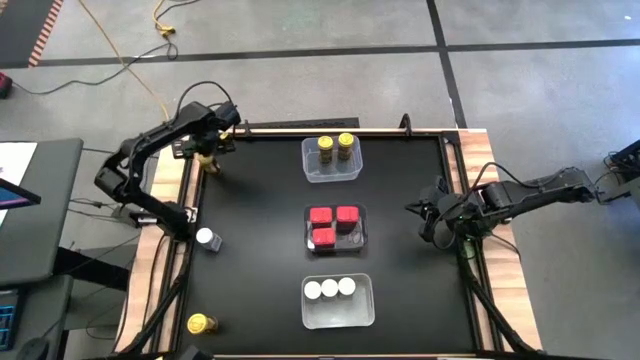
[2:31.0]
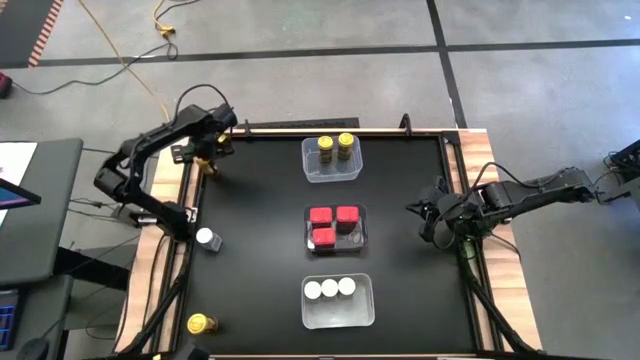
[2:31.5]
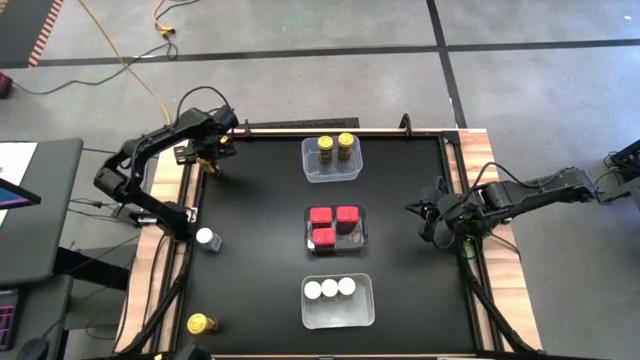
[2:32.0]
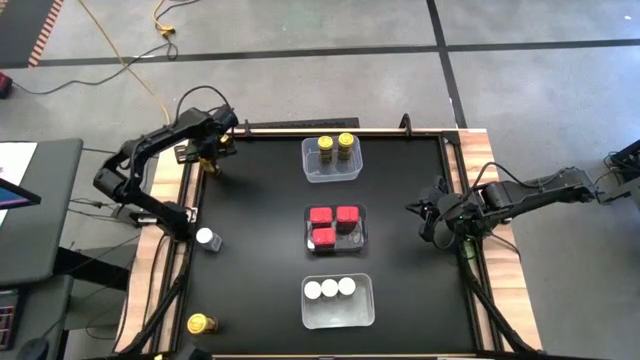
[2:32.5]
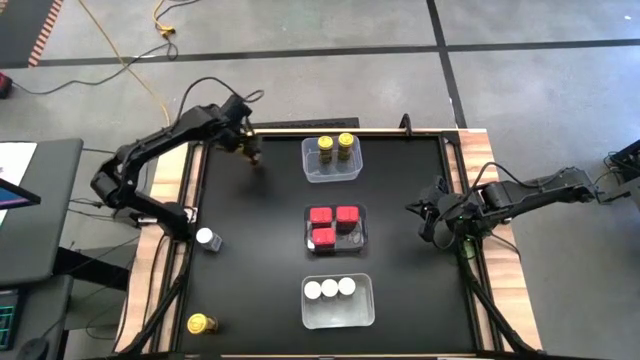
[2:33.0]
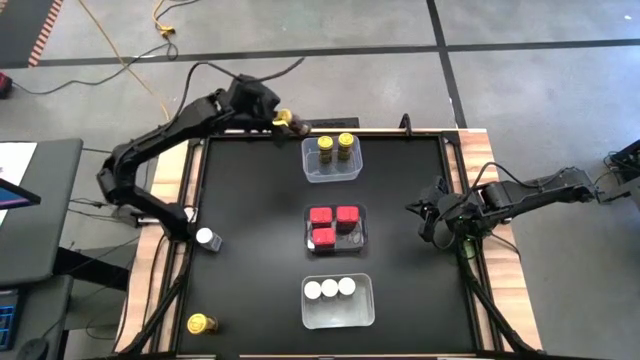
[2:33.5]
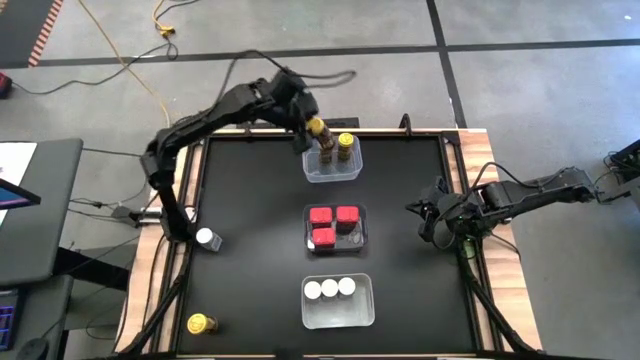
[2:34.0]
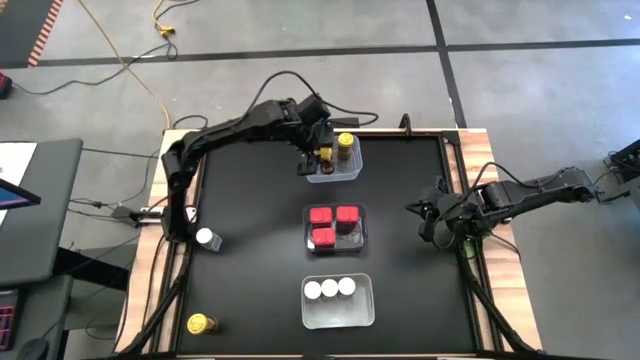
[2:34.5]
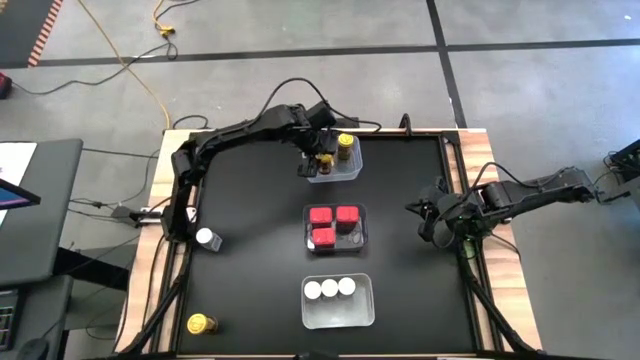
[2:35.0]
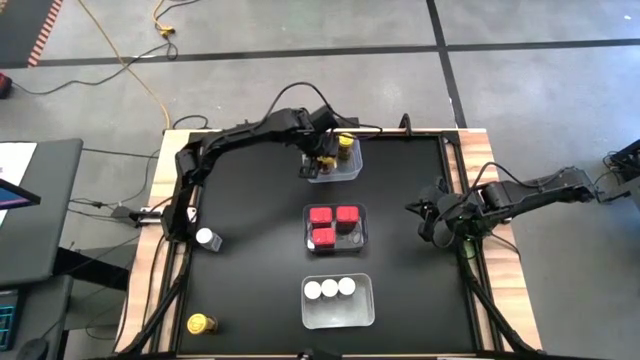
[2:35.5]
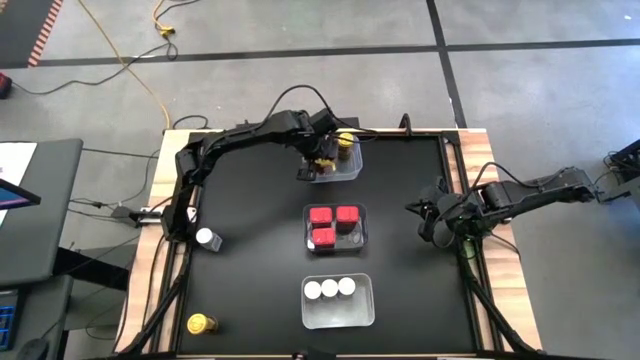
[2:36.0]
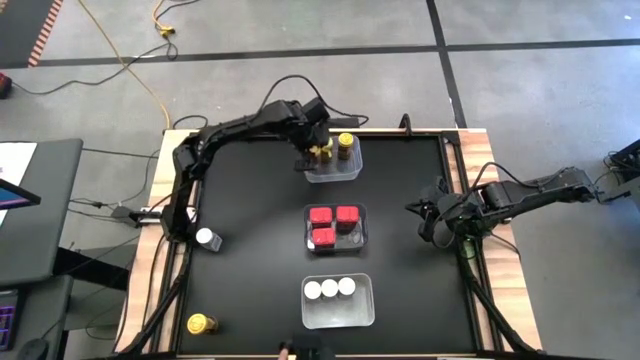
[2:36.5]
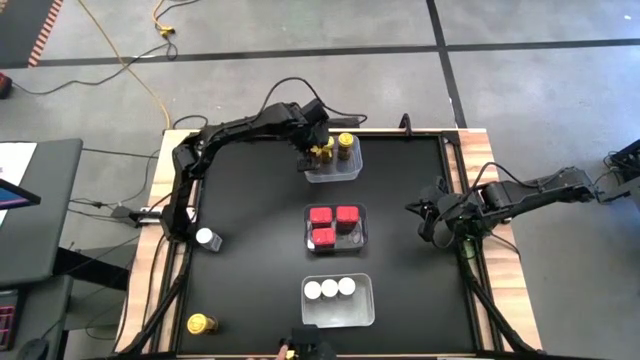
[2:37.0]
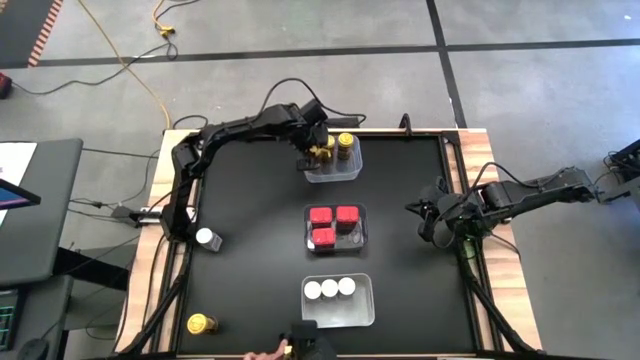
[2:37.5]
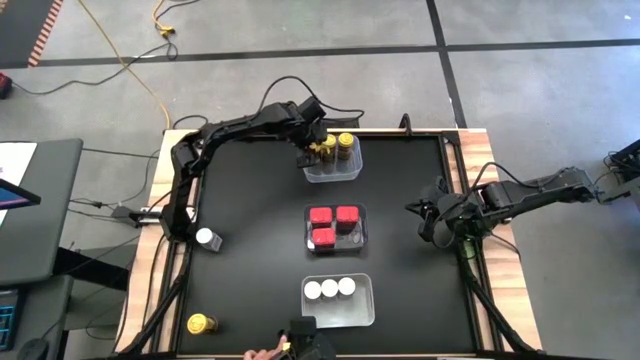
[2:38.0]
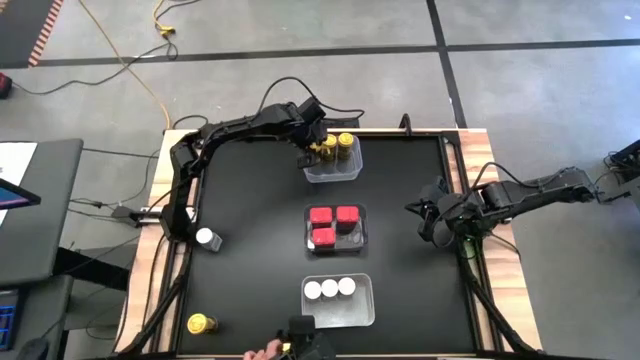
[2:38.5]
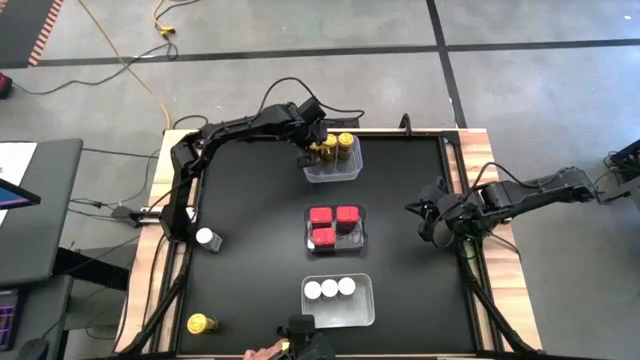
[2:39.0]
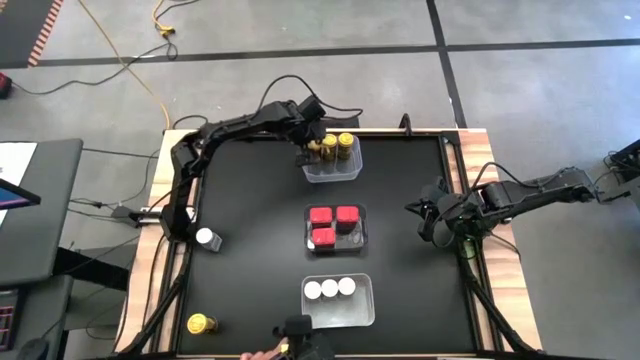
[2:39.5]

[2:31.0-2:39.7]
Task: Sort spices by type
Put the top yellow seasoning bottle into the transparent bin

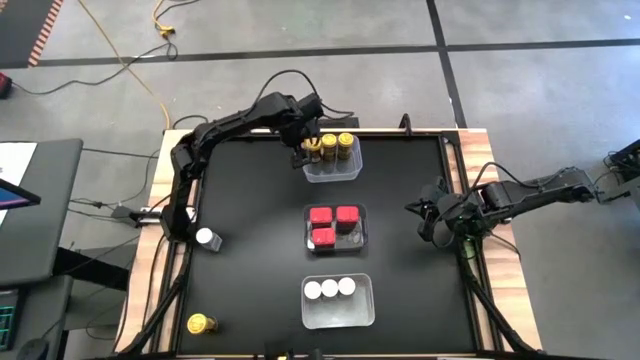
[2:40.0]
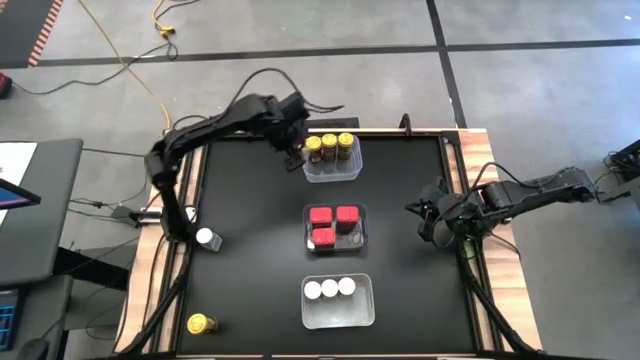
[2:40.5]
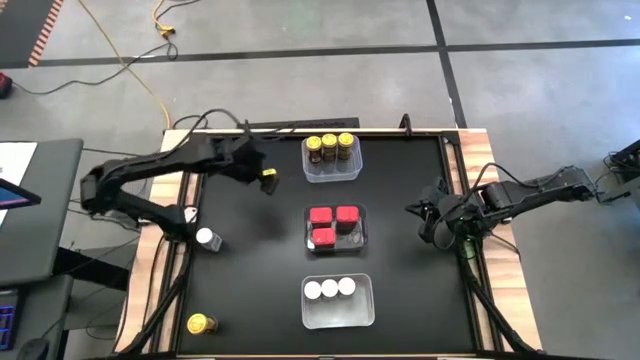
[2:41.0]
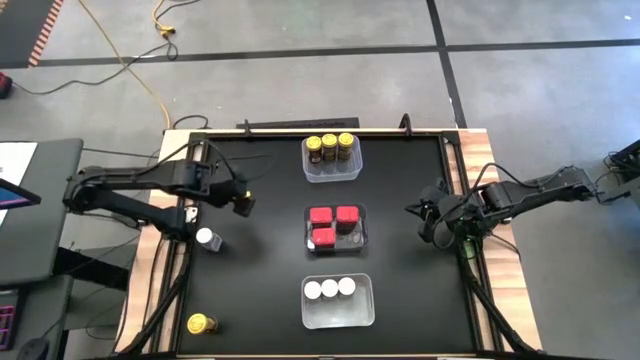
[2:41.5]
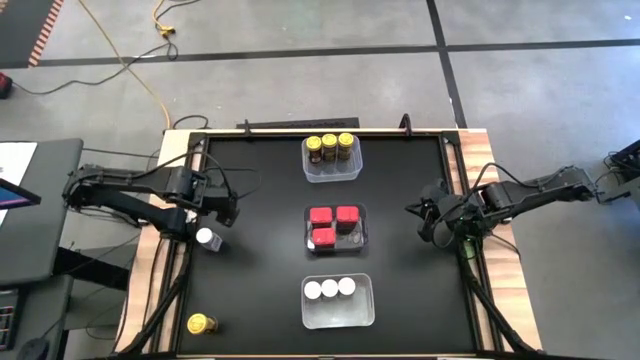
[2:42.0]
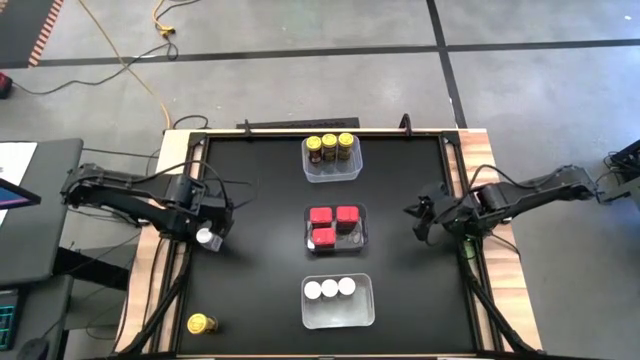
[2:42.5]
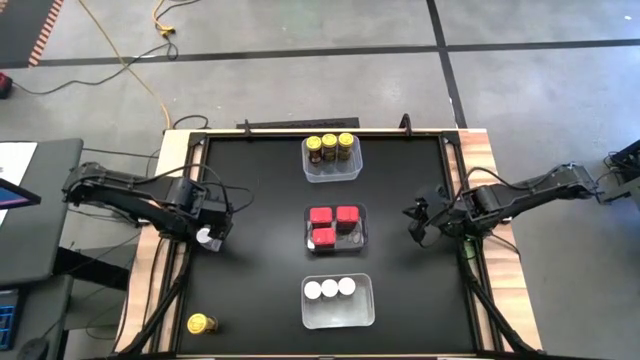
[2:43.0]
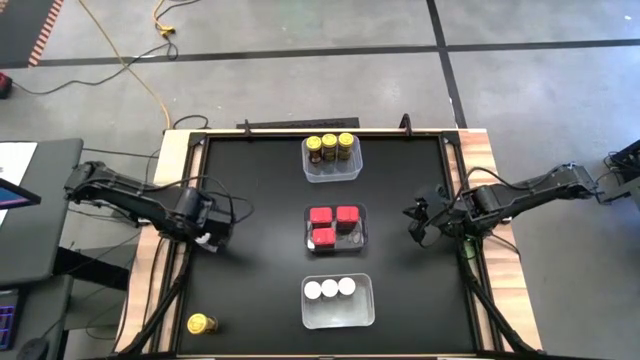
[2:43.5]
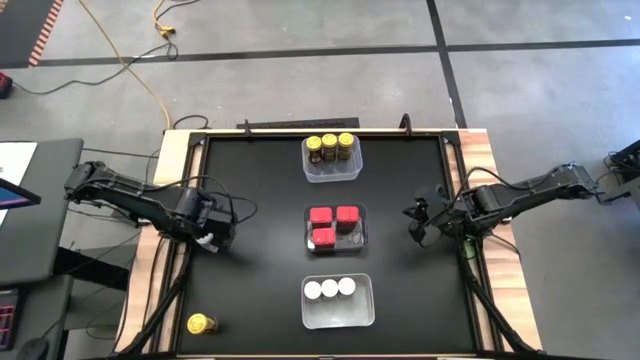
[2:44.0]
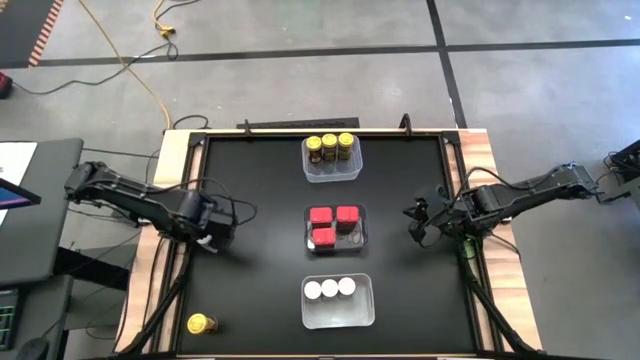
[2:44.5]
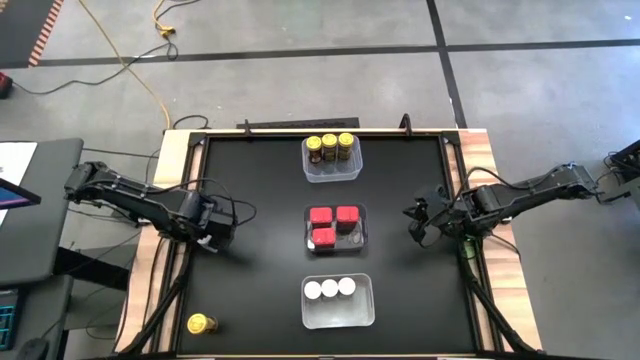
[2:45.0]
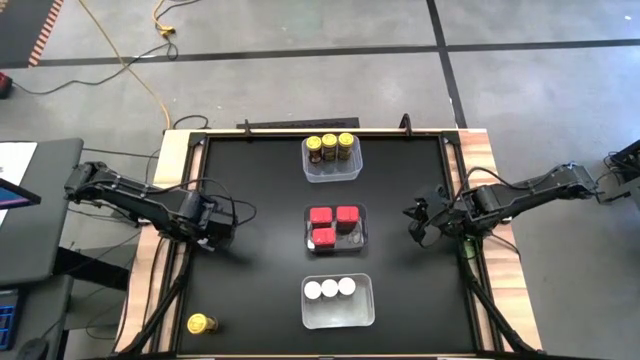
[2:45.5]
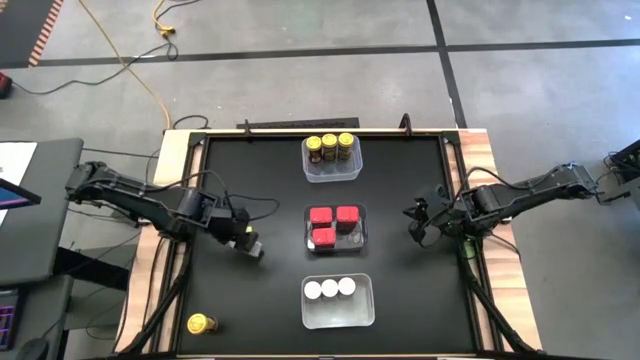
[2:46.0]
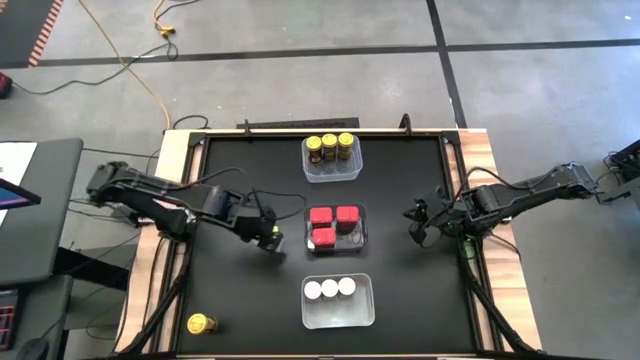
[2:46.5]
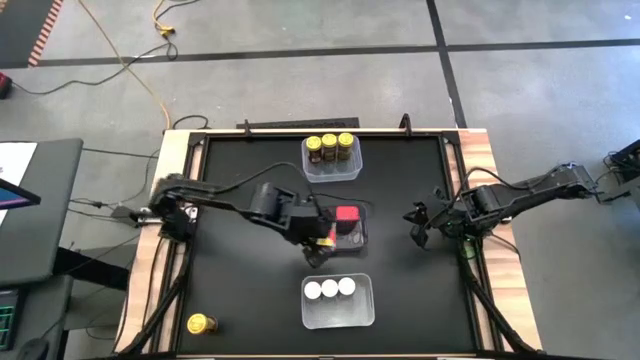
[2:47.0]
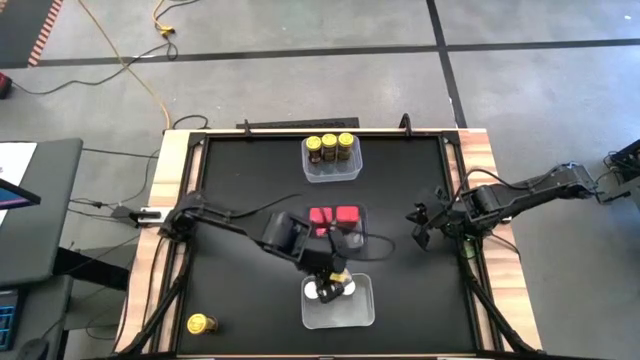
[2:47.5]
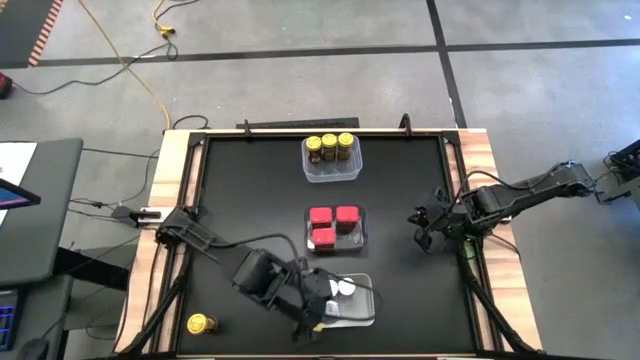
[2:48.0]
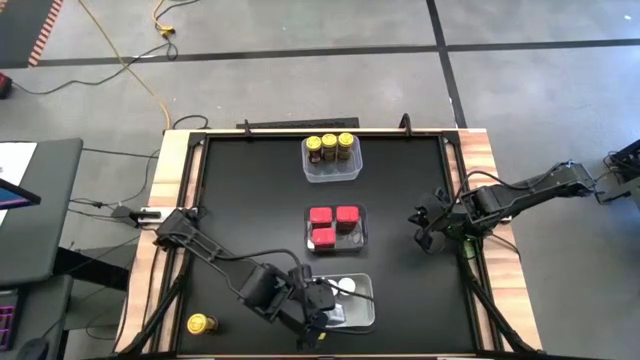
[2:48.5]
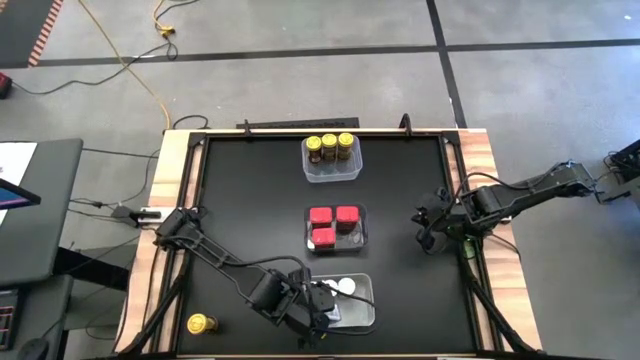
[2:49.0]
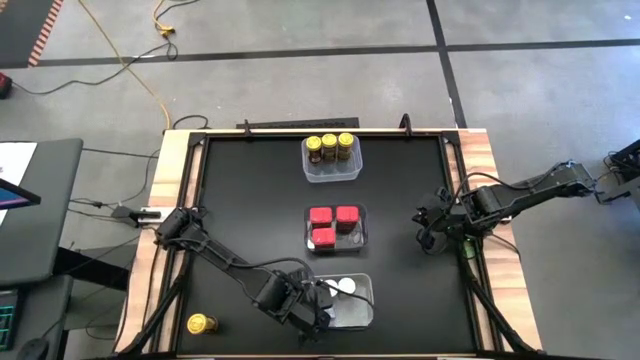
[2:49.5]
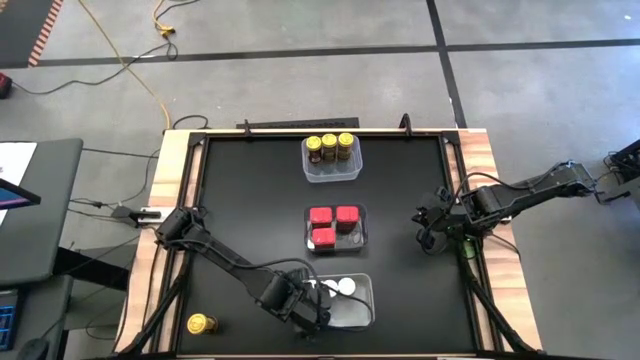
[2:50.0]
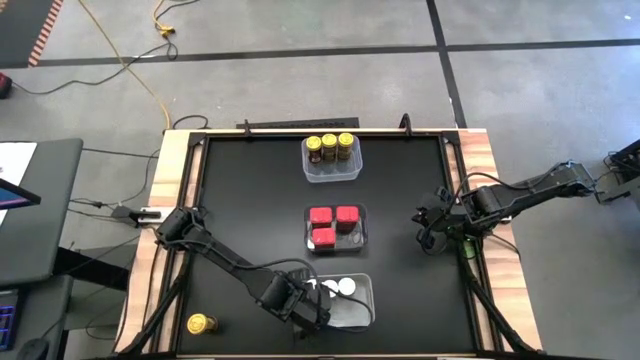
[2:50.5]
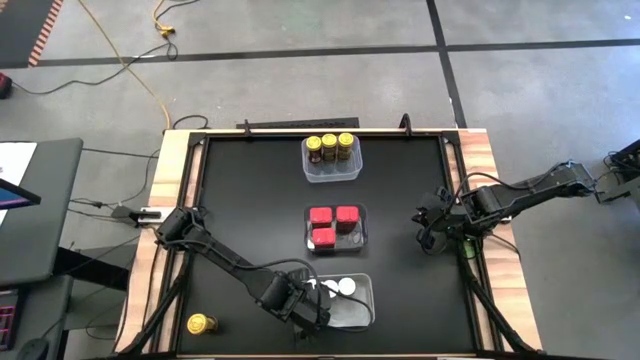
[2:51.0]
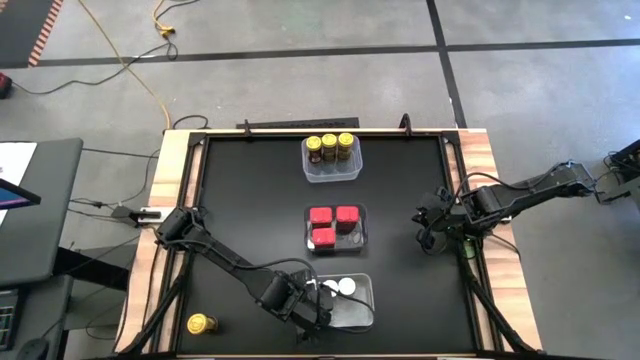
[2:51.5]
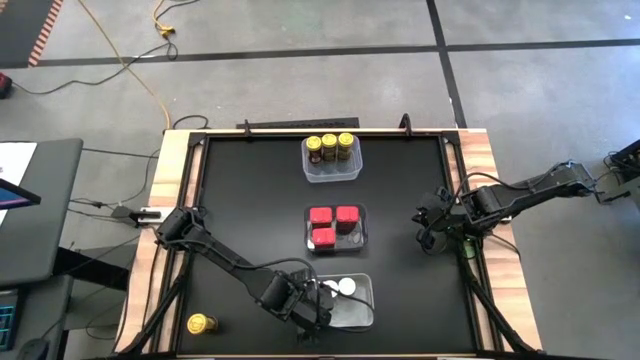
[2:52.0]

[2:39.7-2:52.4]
Put the white seasoning bottle into the gray bin
